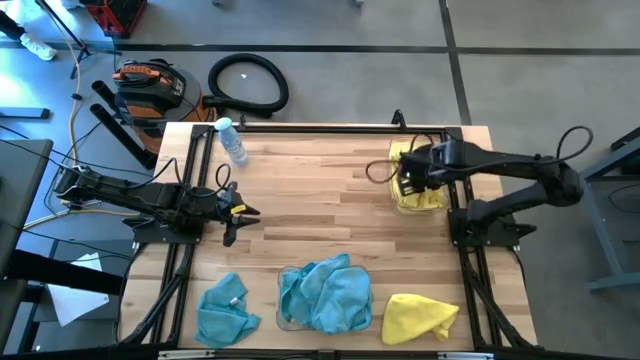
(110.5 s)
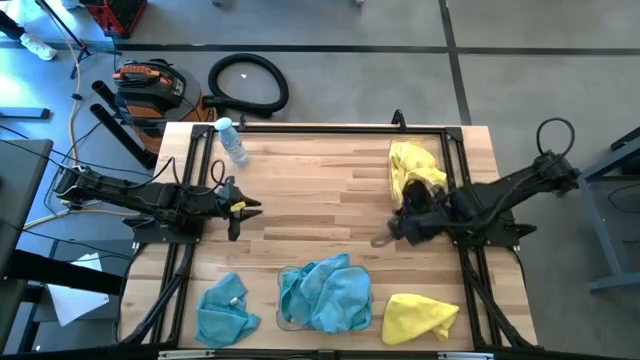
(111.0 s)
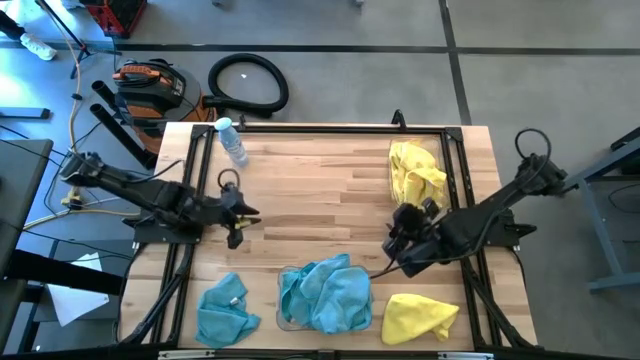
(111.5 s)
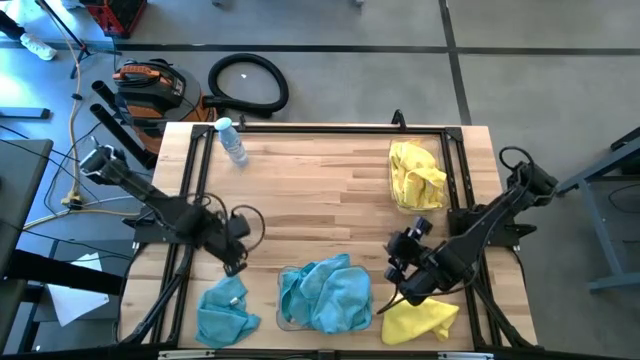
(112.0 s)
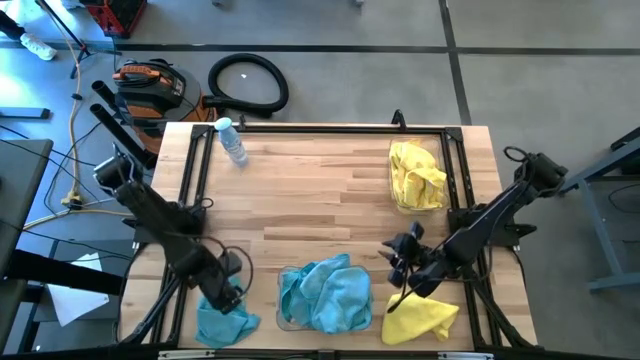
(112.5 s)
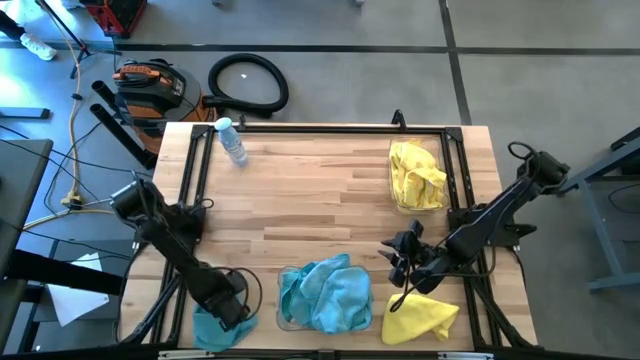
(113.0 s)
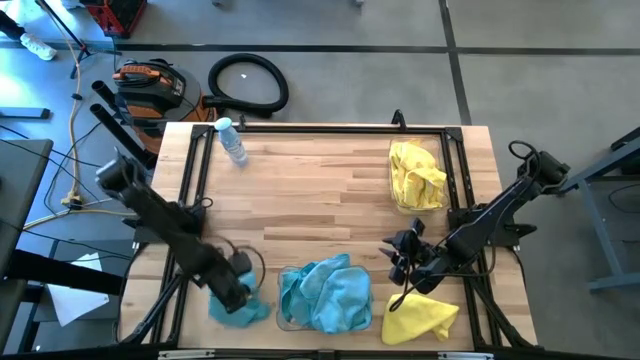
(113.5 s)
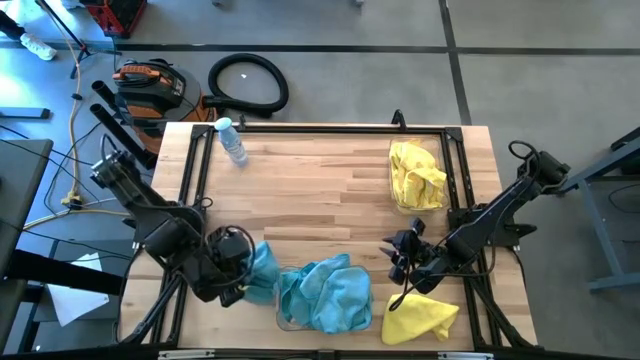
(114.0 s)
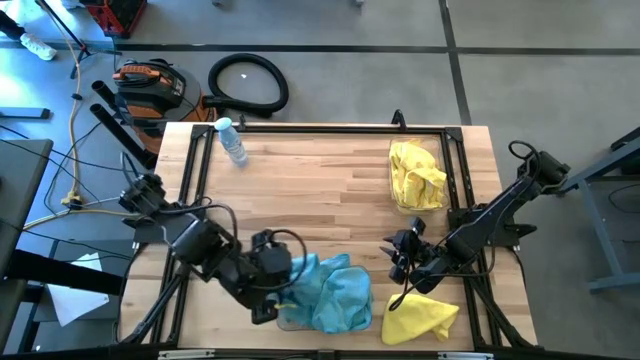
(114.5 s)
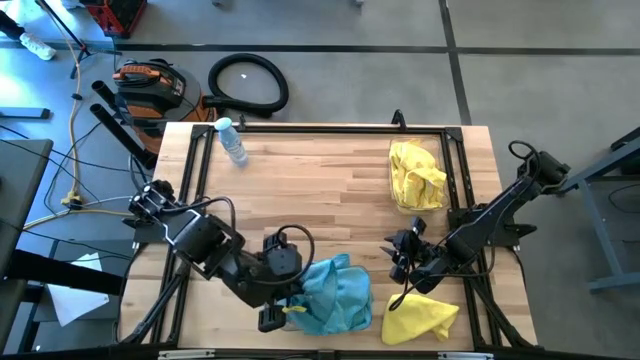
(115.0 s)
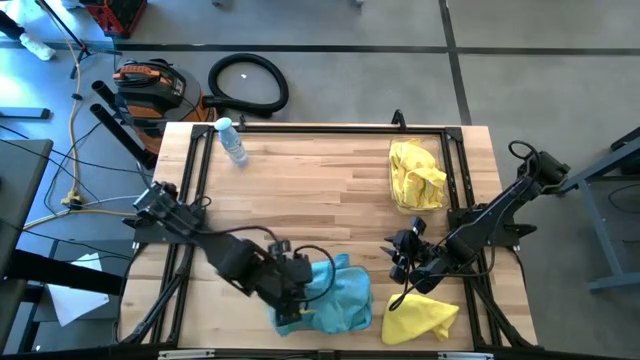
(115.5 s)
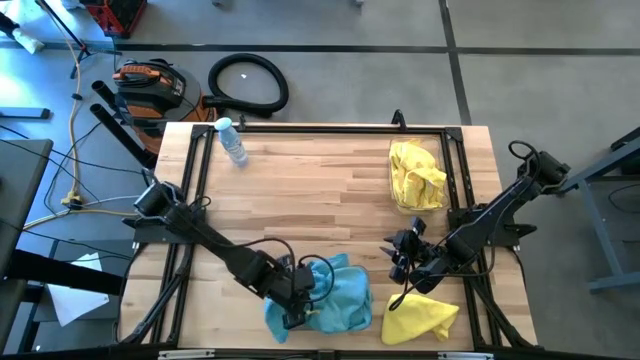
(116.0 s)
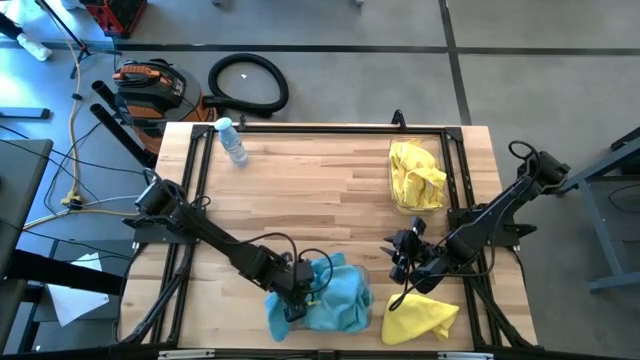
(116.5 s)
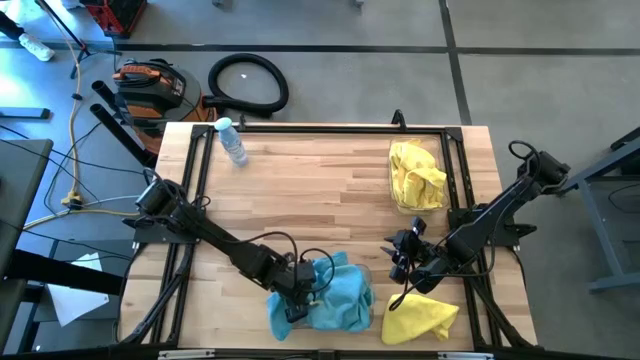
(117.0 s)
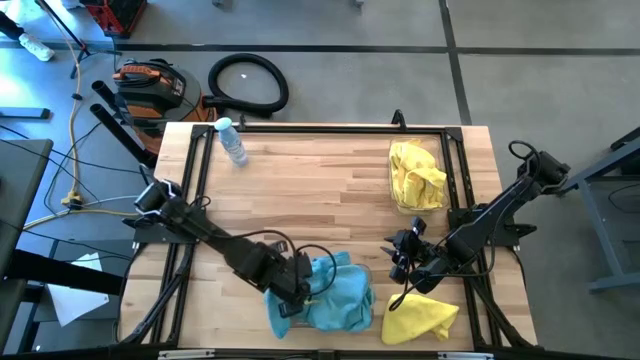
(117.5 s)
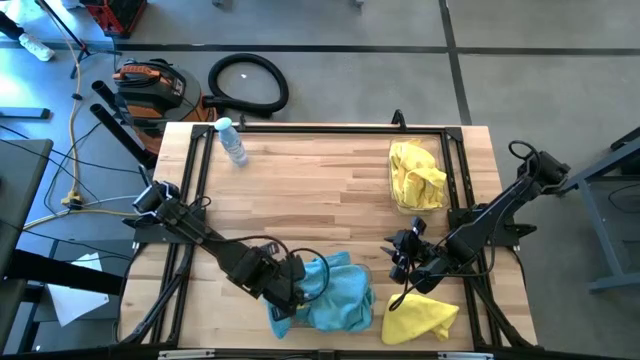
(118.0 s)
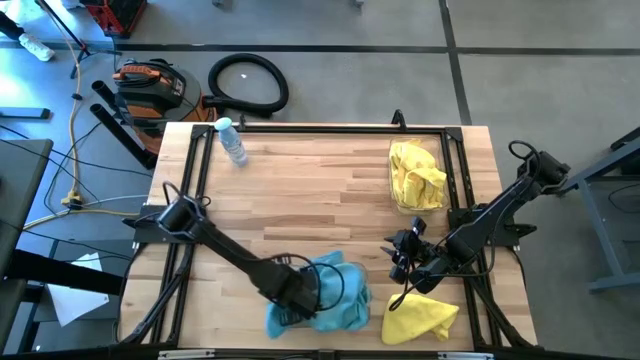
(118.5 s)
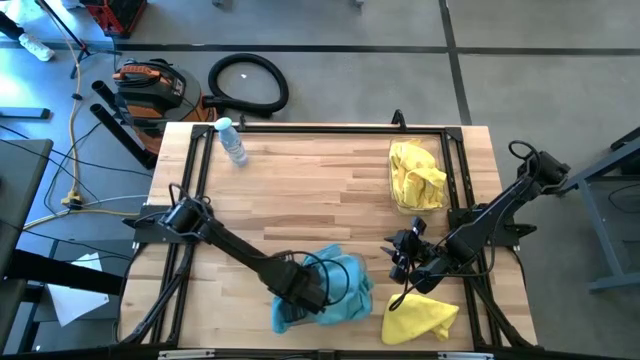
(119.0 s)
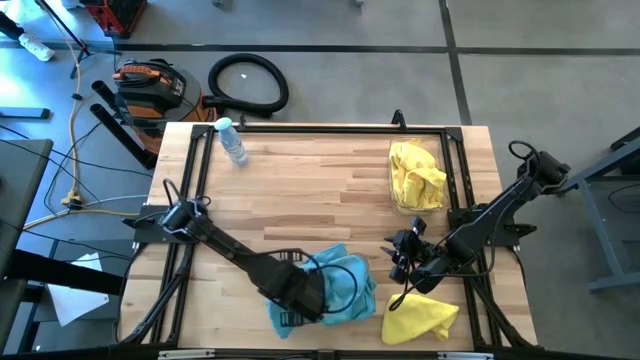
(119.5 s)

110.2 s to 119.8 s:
Task: Sort microfiber towel by color & place in baskets
Put the blue microfiber towel into the bottom transparent bin

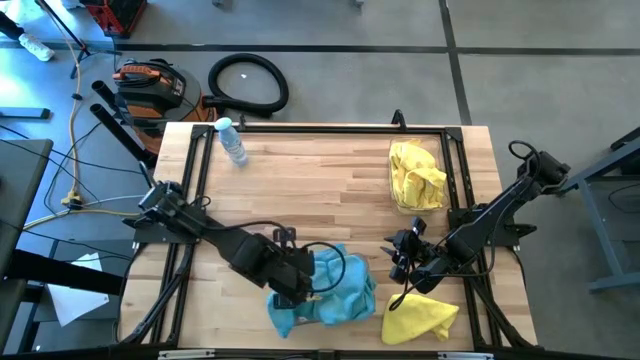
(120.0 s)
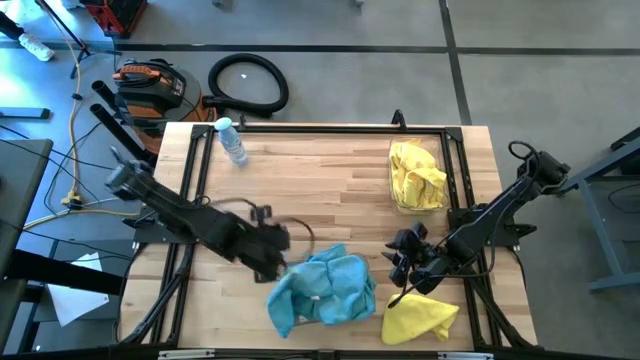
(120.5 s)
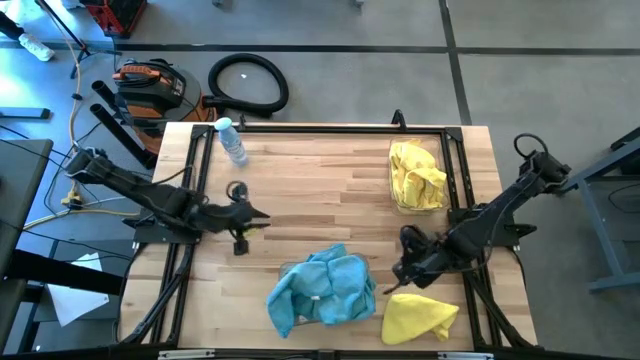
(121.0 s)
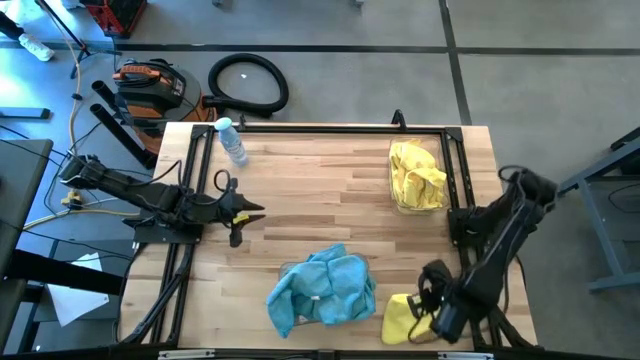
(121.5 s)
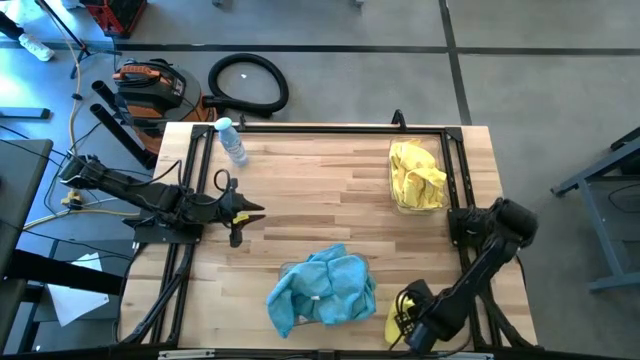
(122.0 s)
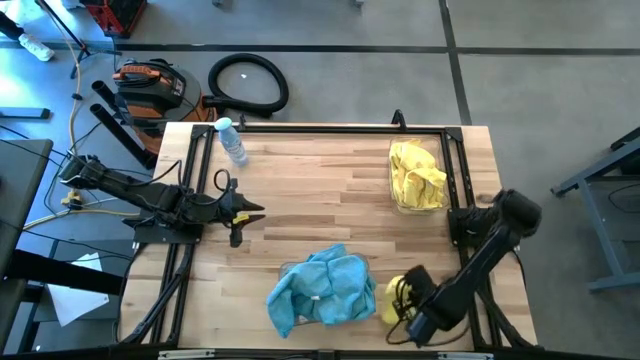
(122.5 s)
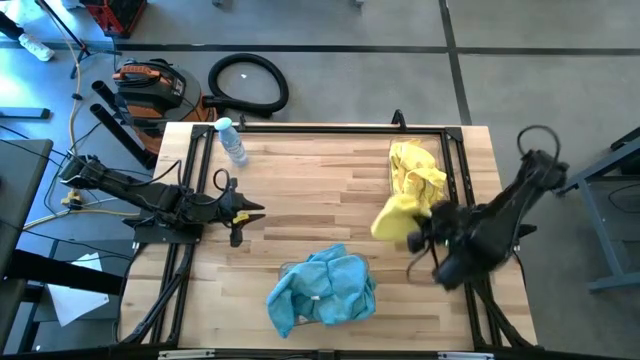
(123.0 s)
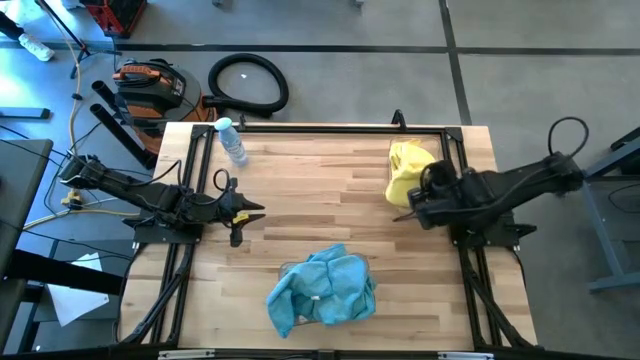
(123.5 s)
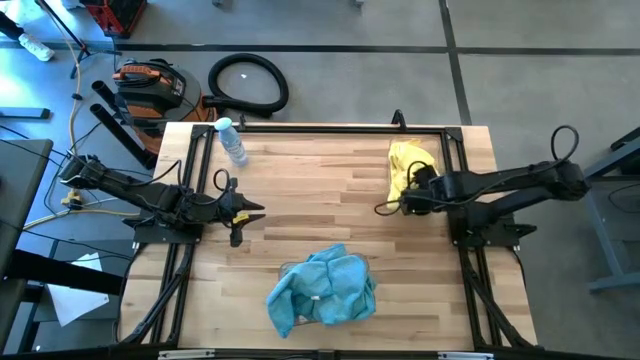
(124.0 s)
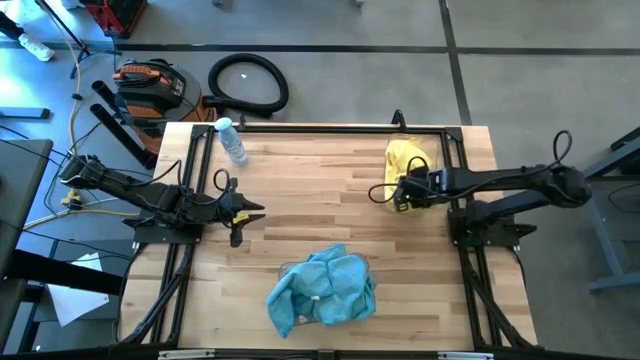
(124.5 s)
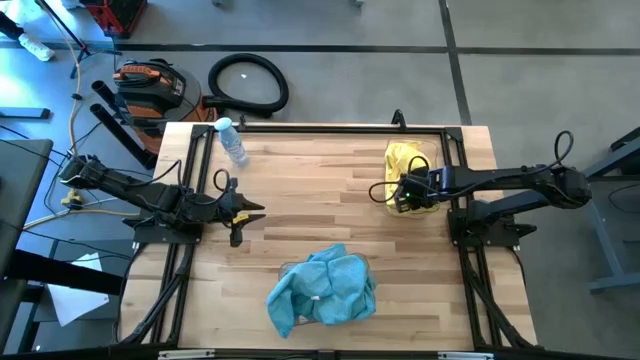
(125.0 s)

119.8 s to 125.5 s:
Put the yellow microfiber towel into the top transparent bin

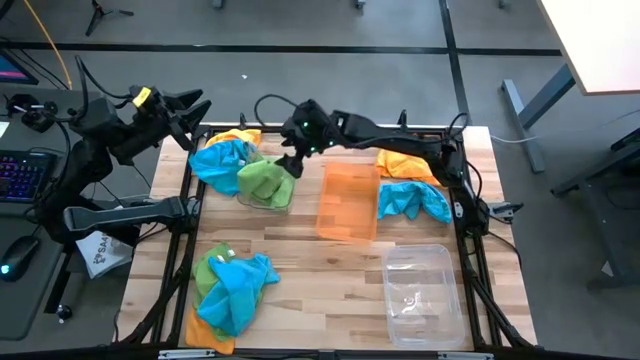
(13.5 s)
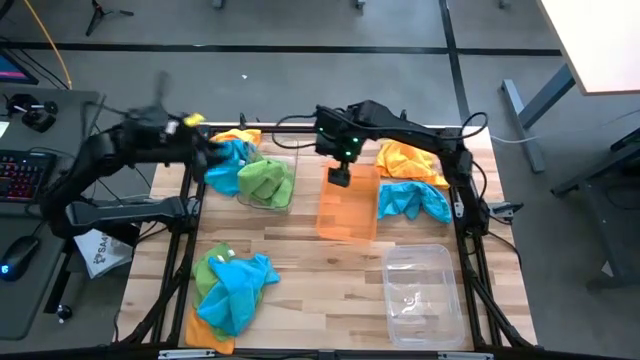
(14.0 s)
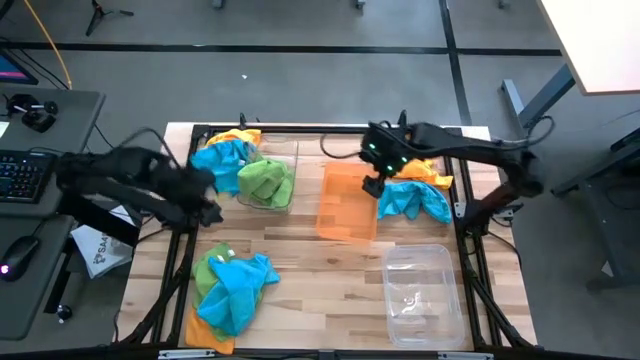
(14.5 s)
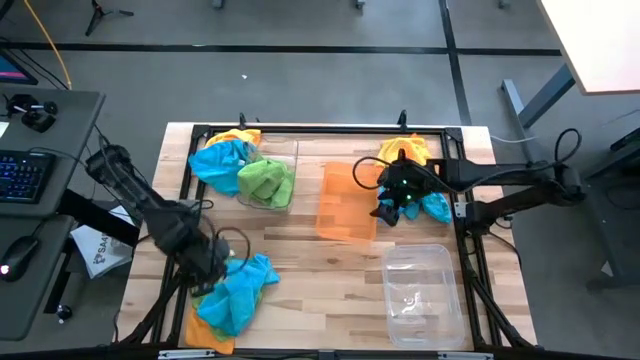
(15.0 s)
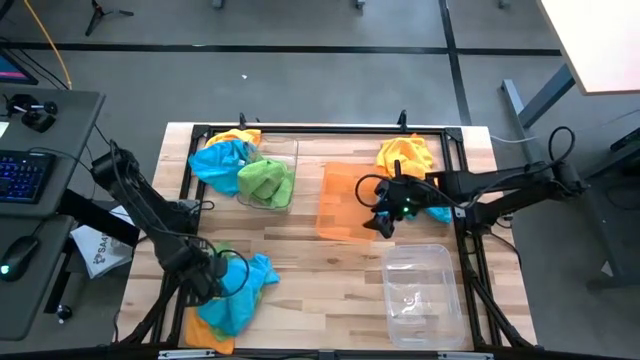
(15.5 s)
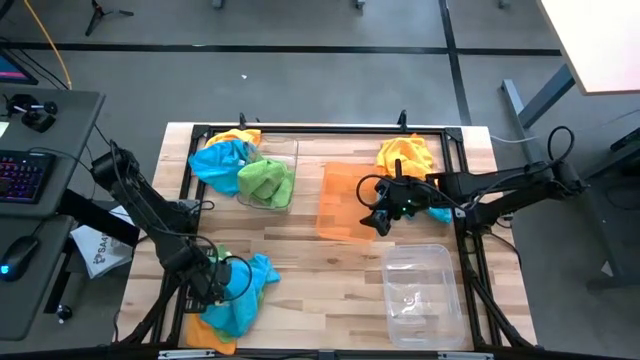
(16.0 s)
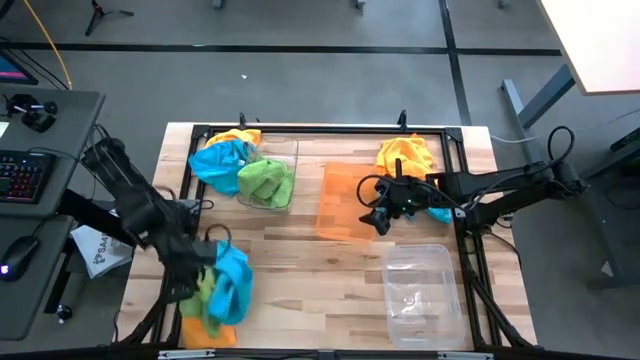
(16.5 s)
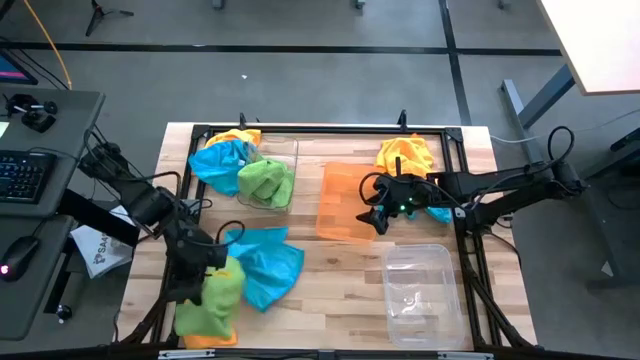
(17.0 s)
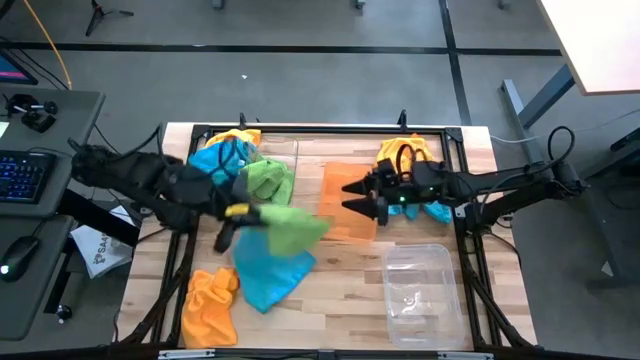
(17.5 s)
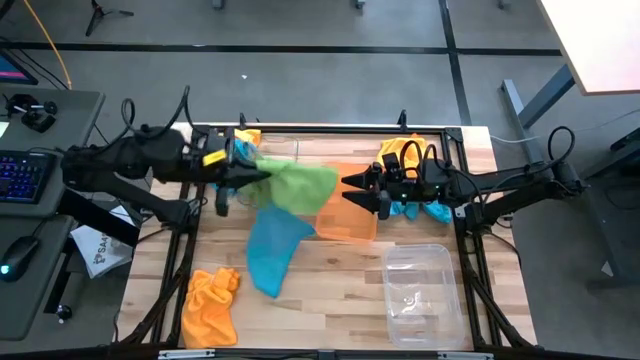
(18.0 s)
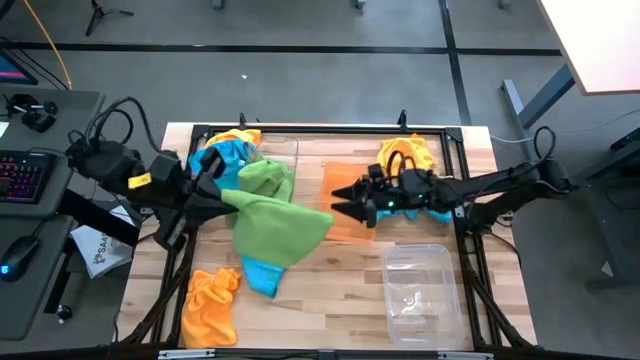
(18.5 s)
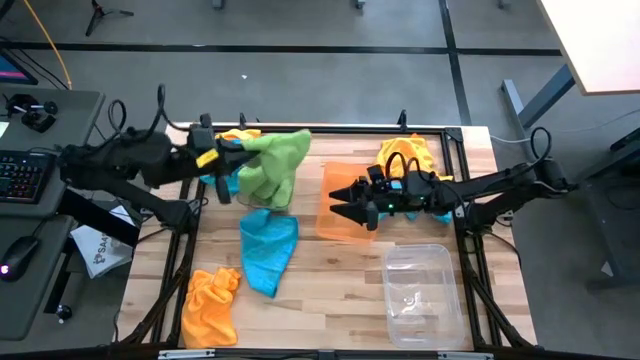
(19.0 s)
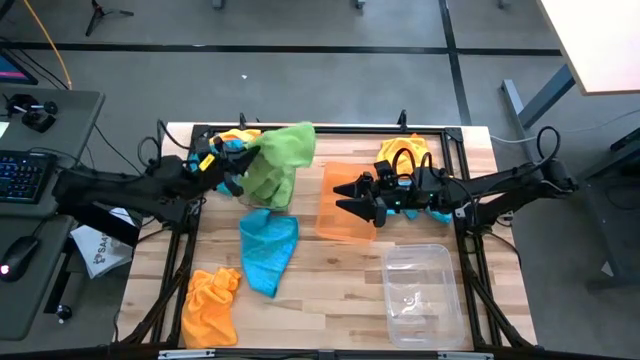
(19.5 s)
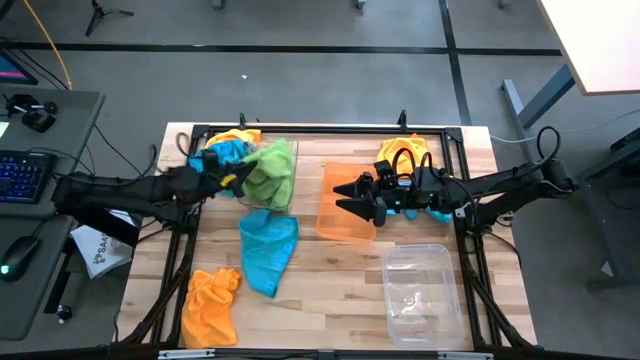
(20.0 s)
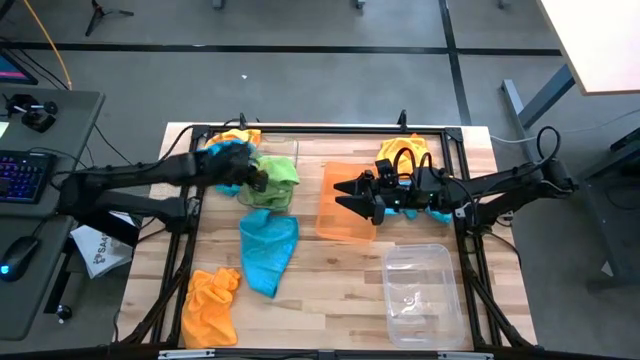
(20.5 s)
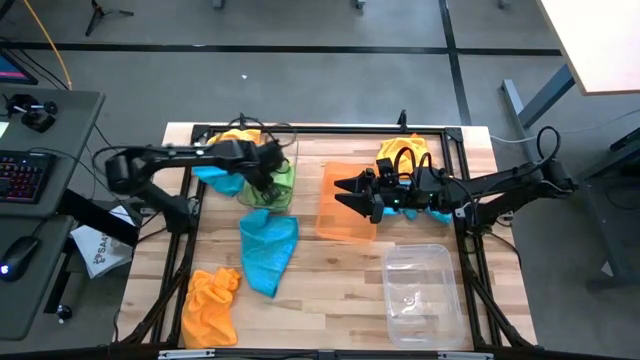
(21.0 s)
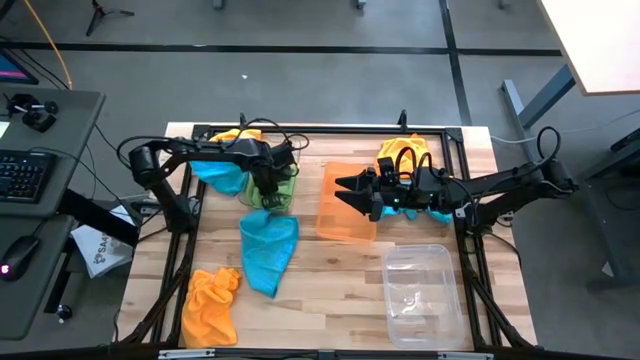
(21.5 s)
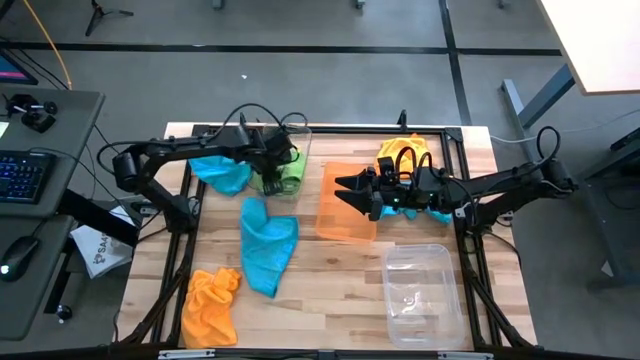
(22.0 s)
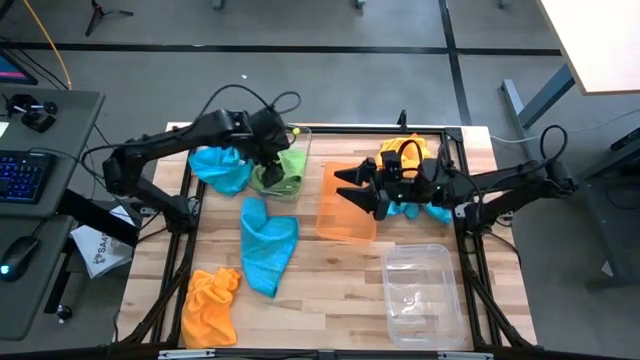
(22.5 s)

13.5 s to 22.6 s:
Task: Sort microfiber towel by color & place in baskets
Put the green microfiber cloth into the transparent bin
